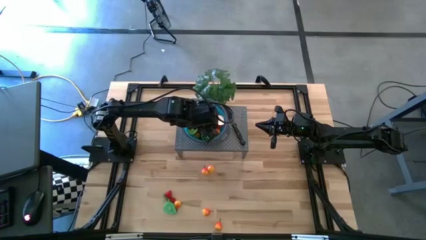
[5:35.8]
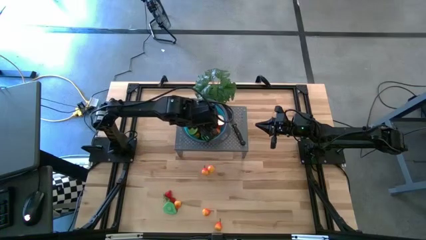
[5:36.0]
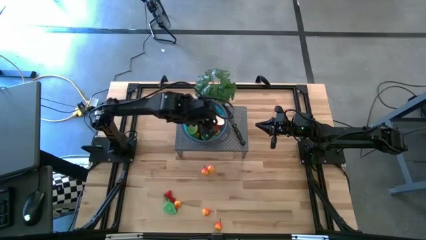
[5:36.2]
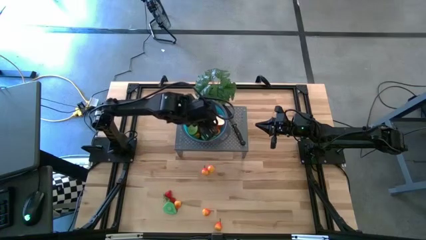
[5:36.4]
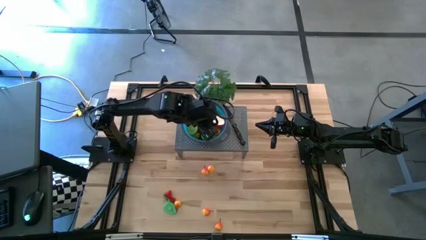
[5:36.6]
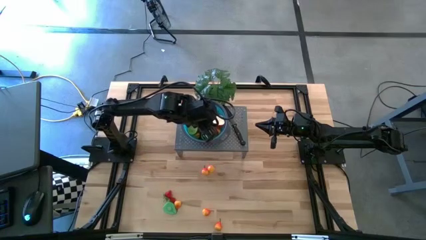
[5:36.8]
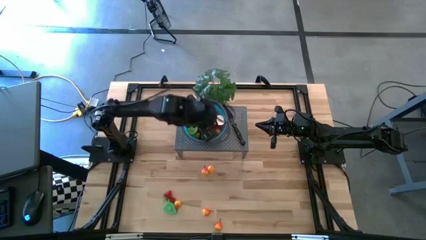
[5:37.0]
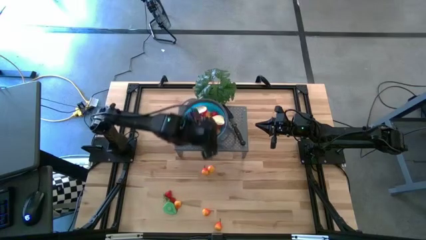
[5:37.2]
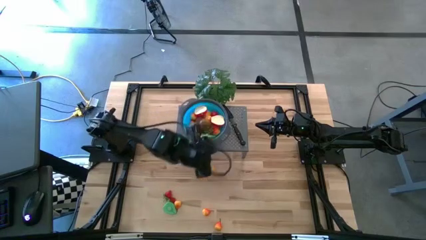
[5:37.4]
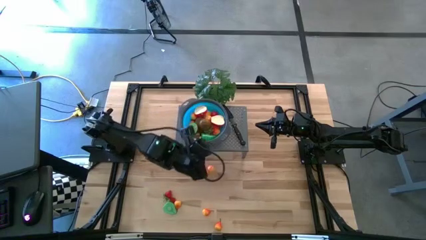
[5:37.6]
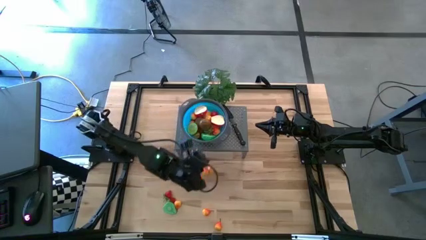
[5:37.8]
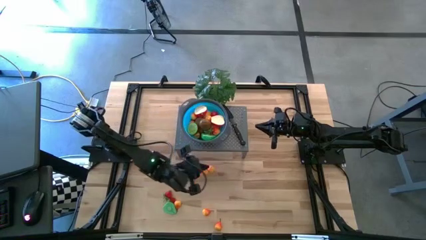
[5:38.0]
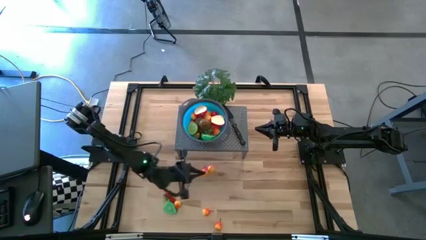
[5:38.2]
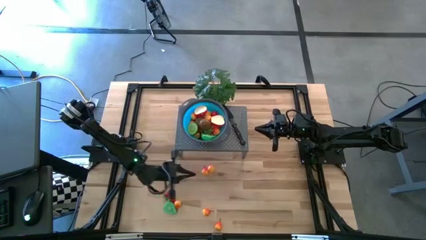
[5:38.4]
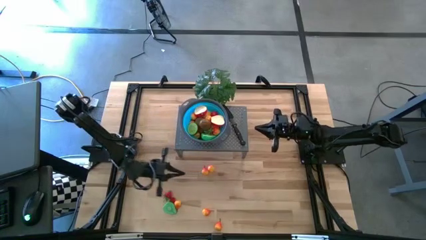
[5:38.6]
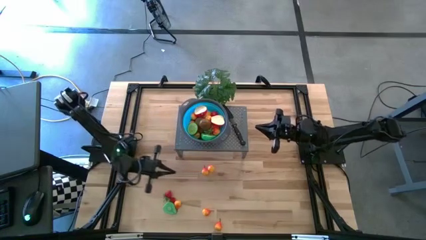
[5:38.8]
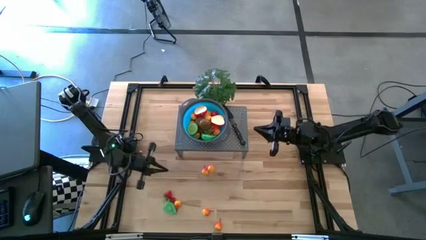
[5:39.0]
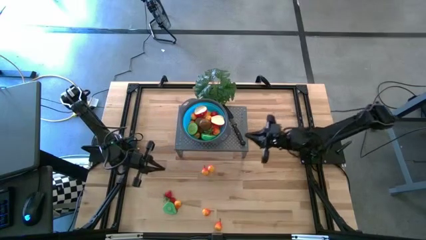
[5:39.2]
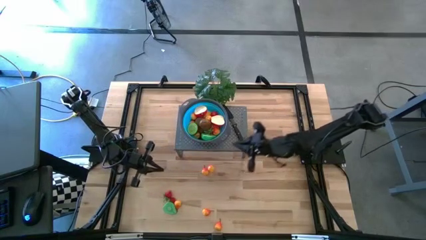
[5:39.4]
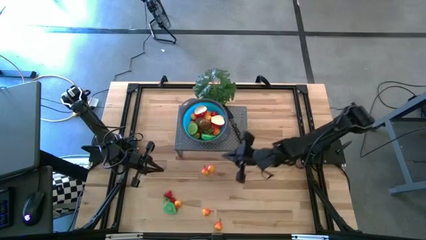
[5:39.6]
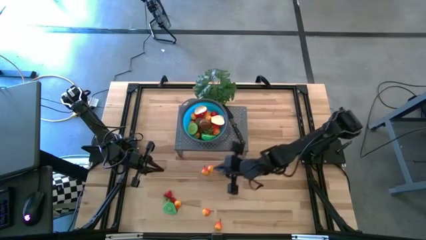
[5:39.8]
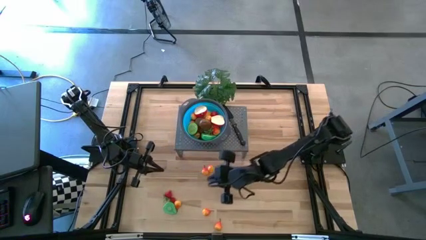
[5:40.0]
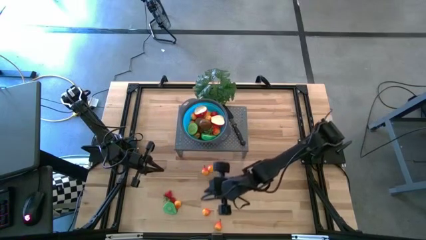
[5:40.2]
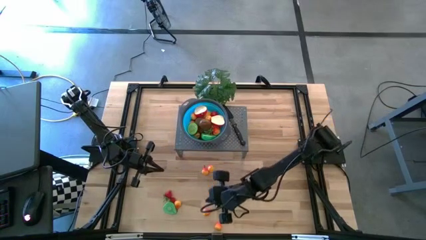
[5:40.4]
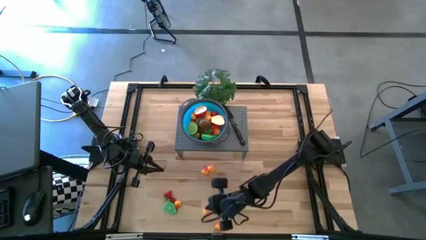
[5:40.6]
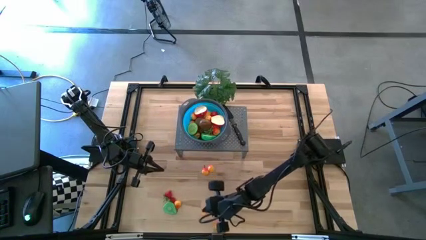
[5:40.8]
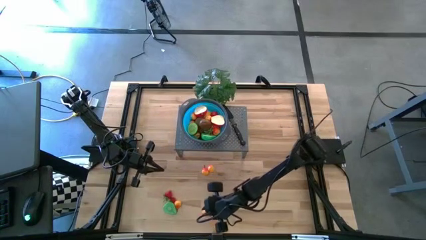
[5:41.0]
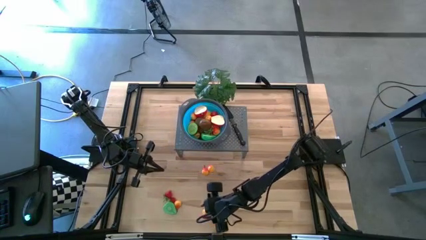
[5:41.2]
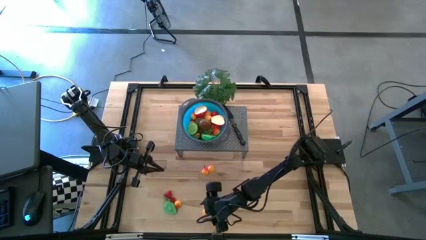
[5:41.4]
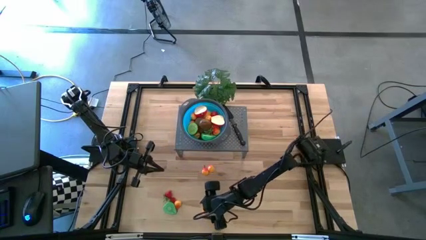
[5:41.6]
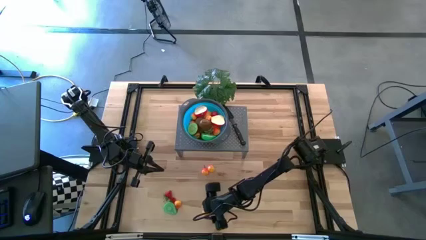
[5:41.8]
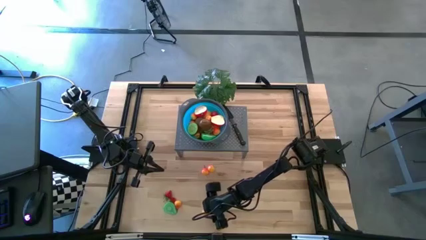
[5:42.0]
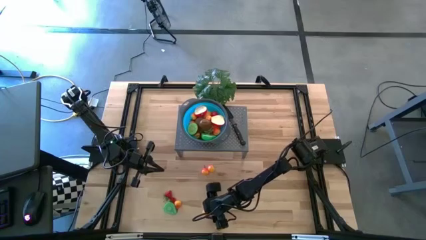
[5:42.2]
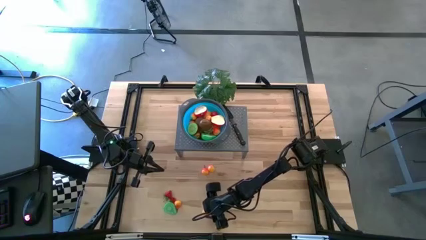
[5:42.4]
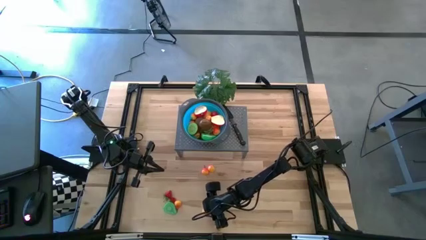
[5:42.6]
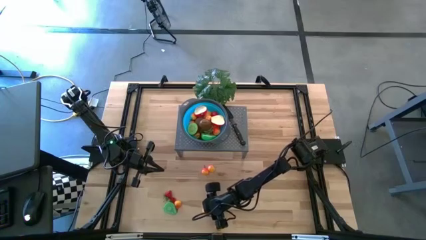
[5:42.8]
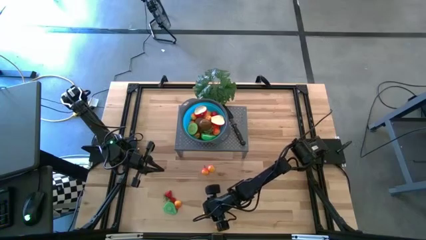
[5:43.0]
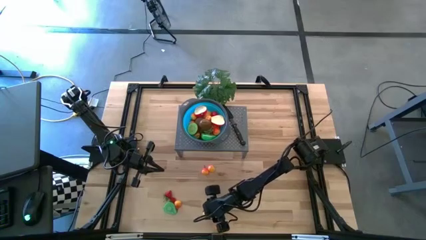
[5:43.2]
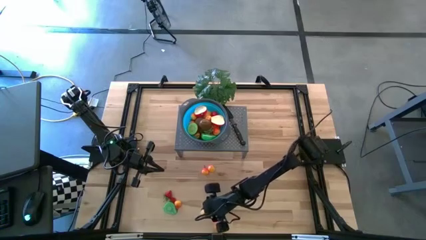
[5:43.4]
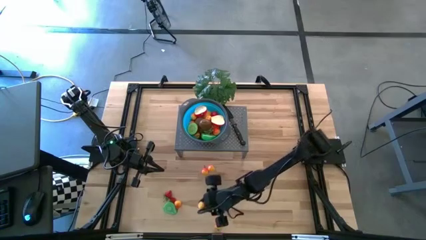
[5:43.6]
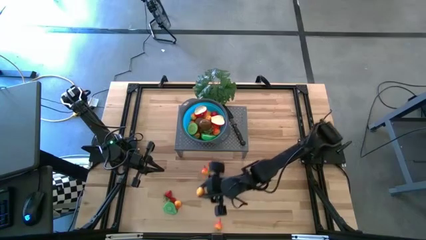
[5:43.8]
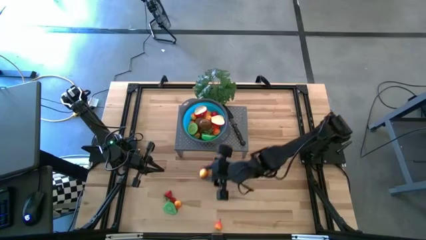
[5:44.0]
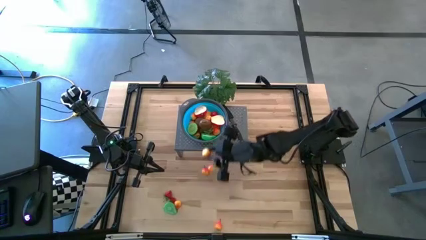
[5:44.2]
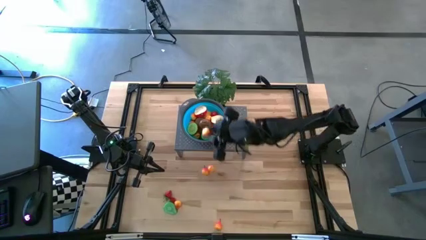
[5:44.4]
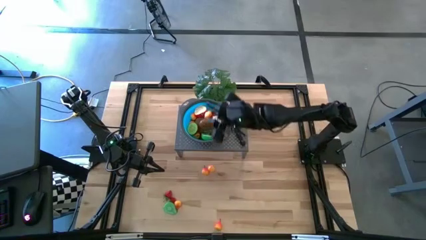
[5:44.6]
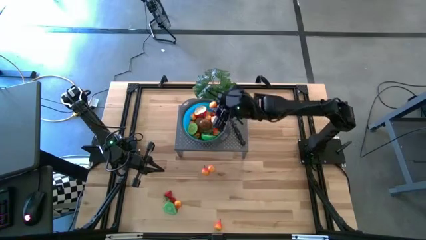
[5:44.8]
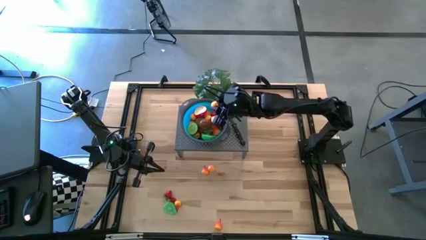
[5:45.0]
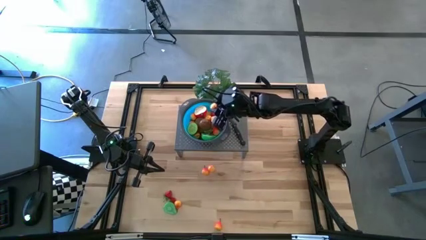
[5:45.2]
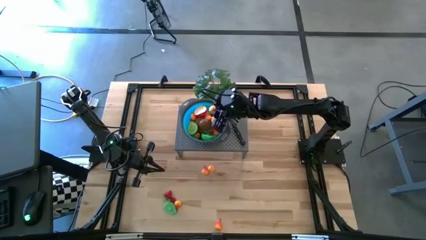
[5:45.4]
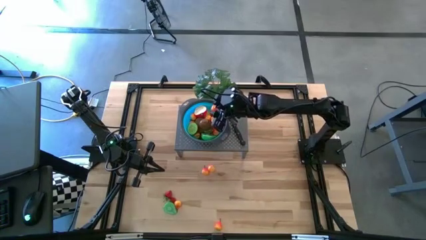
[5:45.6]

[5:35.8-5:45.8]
Task: Pick & Place Fruit
Put the pear into the blue strainer bowl on the shelf

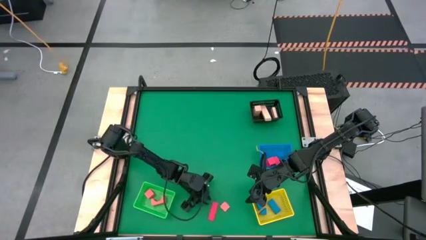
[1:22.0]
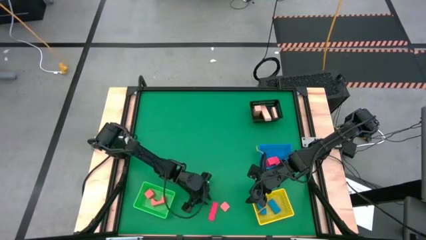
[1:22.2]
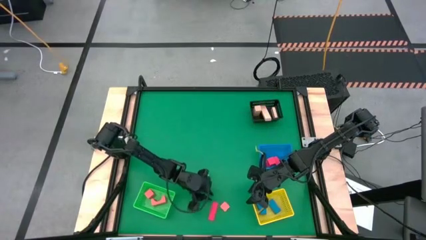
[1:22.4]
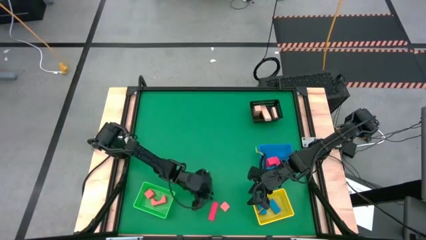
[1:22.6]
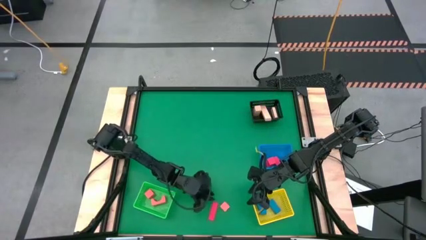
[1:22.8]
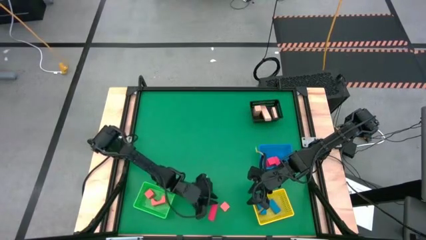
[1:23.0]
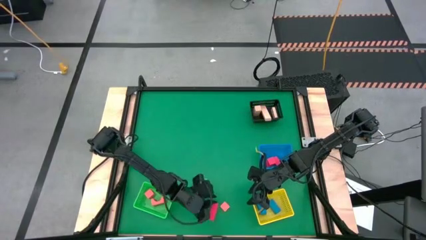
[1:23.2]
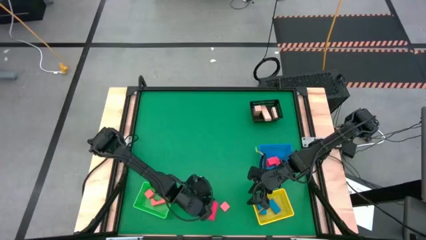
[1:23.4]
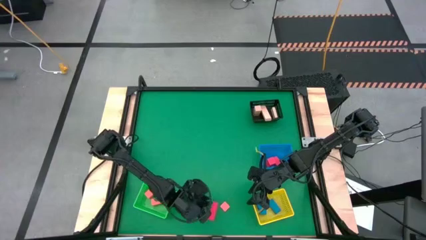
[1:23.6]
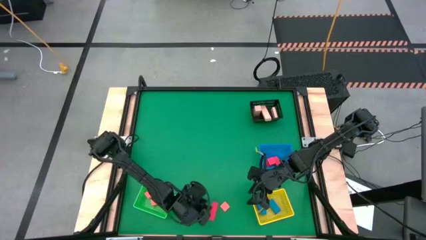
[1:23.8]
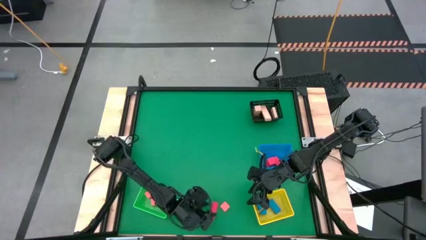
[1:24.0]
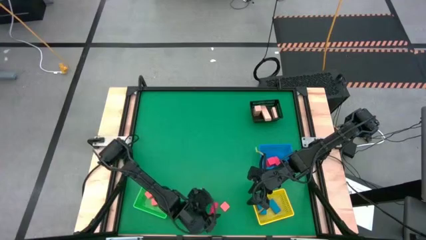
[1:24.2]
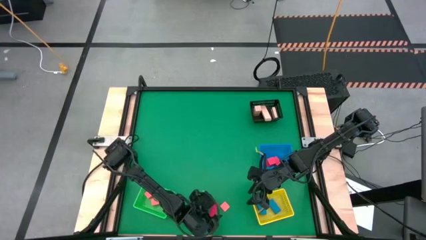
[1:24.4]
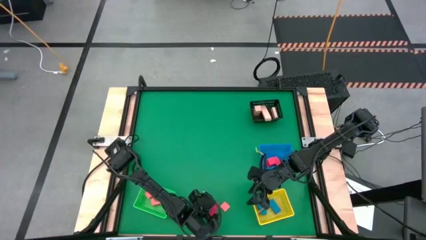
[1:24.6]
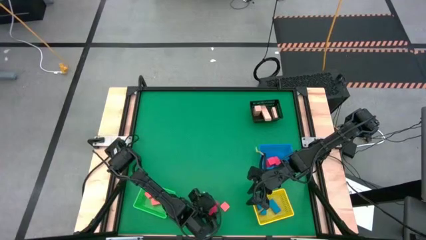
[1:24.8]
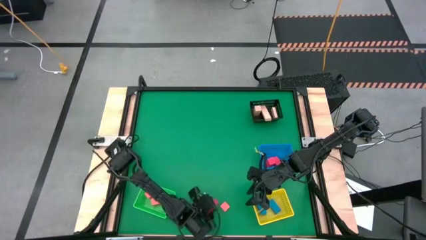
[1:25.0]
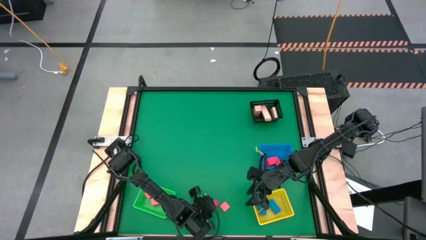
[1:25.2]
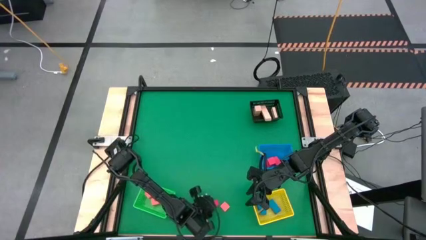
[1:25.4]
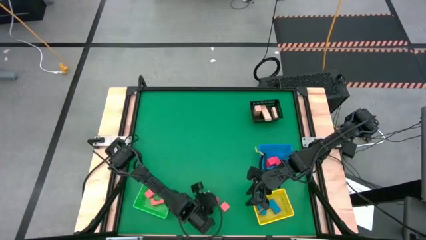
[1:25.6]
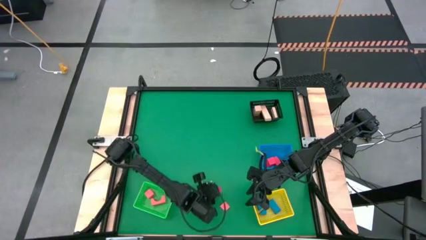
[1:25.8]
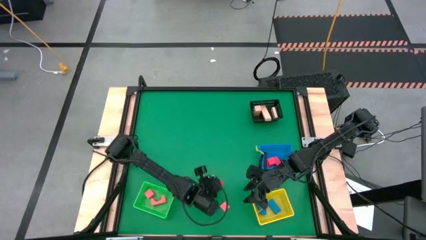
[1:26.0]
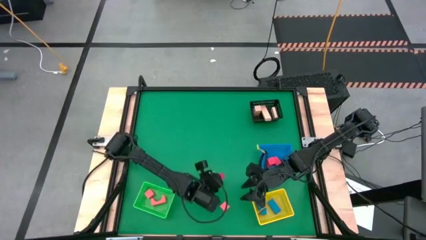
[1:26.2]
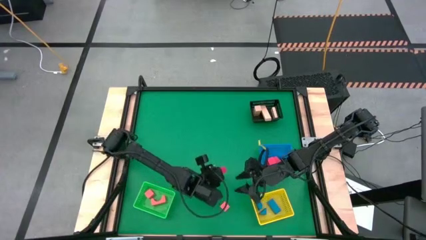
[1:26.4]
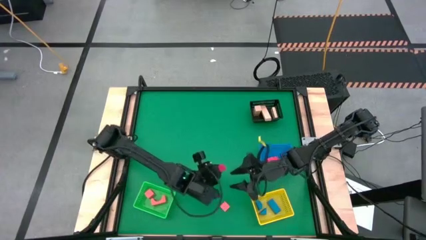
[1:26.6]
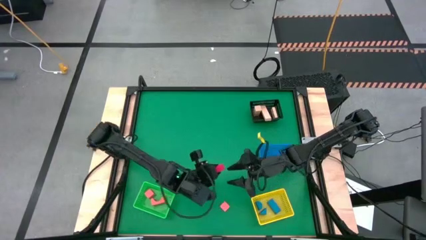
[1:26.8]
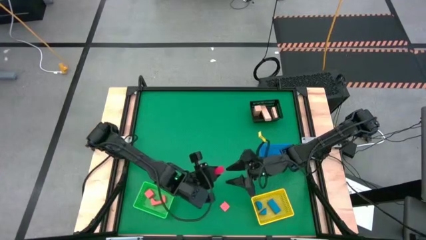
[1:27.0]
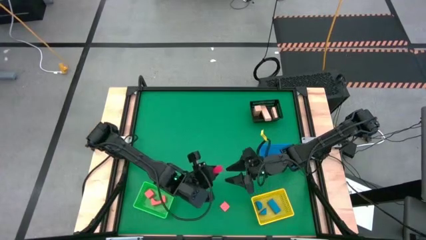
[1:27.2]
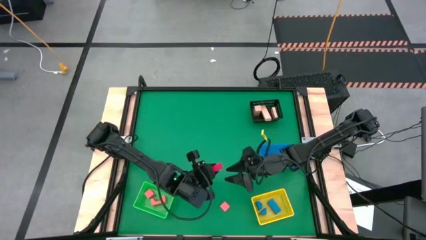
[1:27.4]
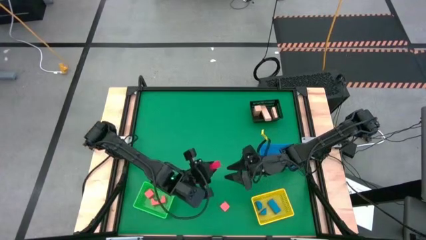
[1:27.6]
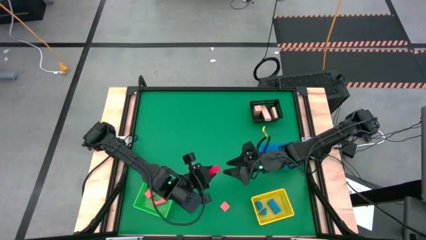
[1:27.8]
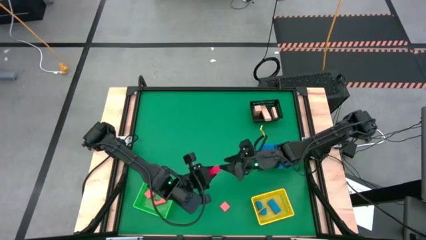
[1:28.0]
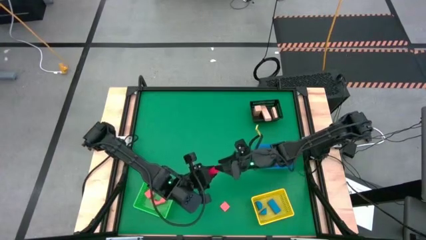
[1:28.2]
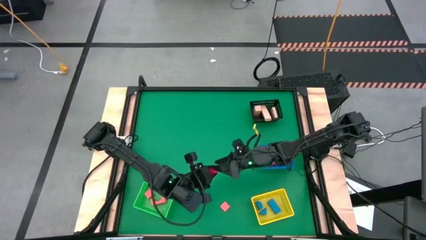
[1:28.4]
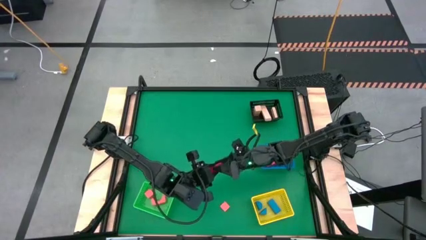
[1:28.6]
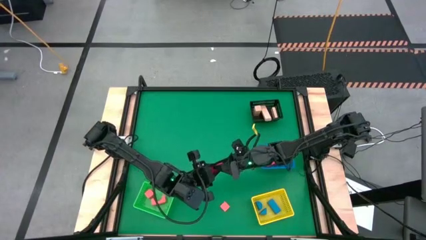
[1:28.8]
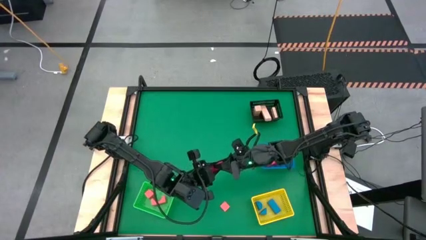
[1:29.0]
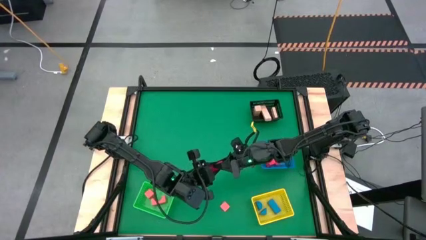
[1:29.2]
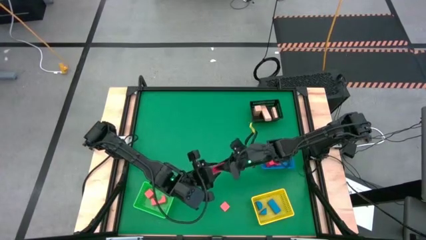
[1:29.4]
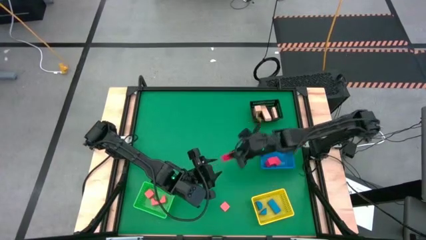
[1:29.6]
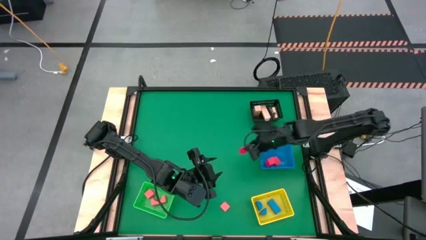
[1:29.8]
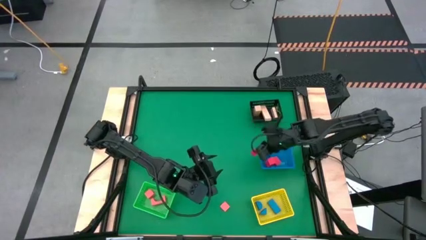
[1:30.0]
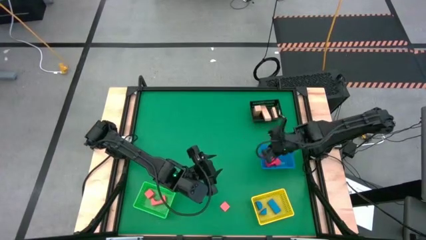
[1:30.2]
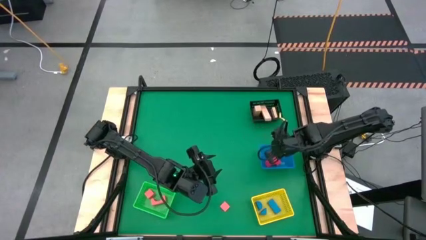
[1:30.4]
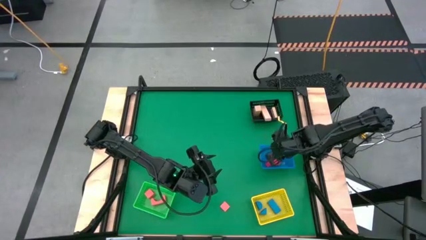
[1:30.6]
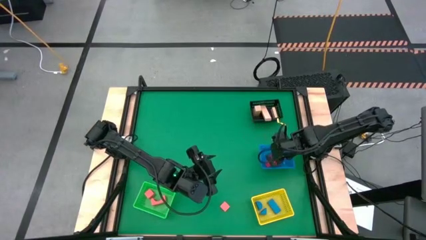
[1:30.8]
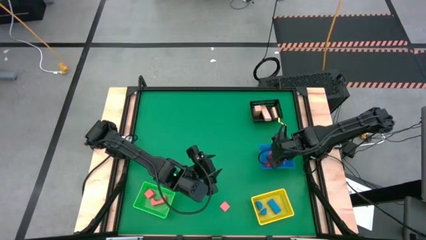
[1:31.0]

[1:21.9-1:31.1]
Task: Sort & place blocks by color
Put the red block into the blue bin
